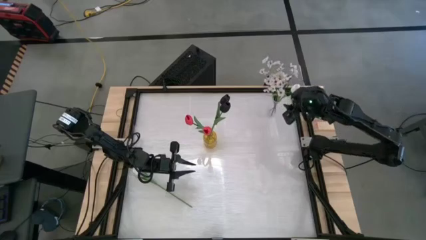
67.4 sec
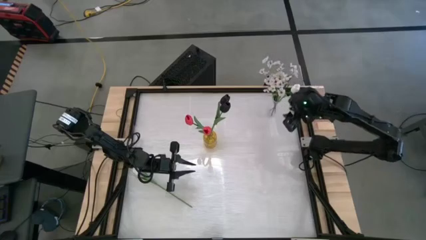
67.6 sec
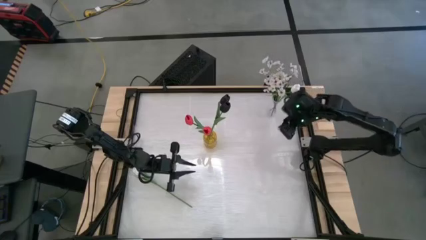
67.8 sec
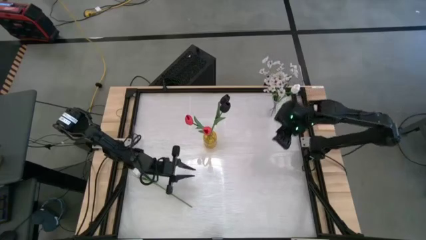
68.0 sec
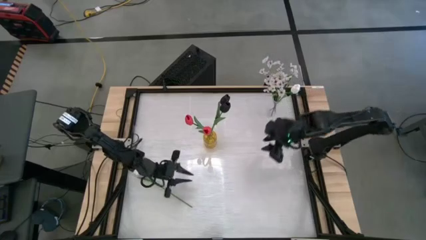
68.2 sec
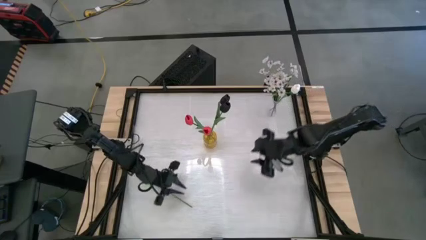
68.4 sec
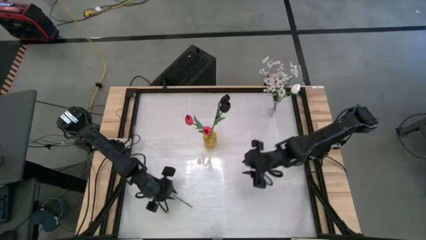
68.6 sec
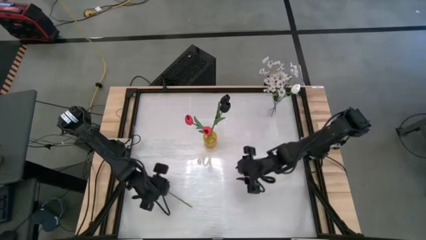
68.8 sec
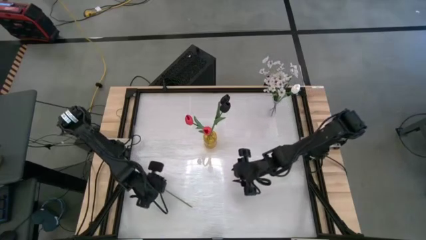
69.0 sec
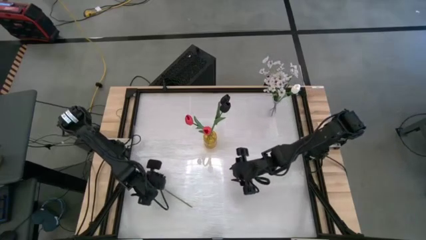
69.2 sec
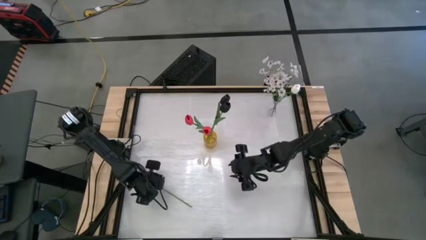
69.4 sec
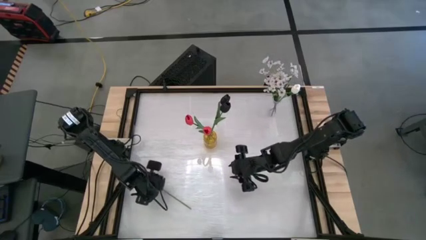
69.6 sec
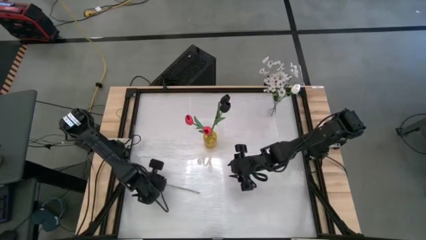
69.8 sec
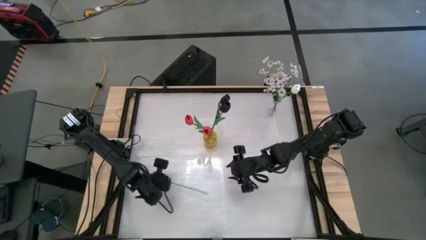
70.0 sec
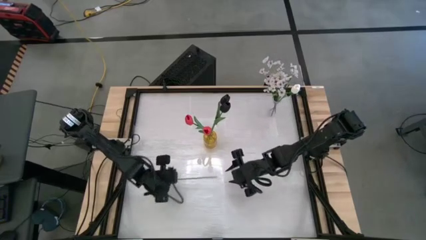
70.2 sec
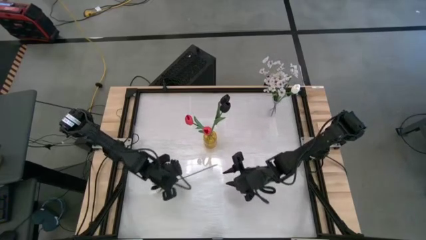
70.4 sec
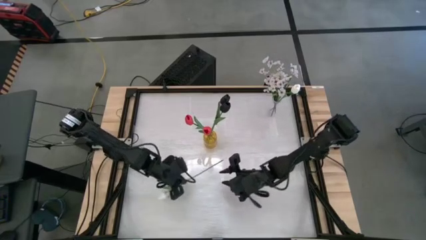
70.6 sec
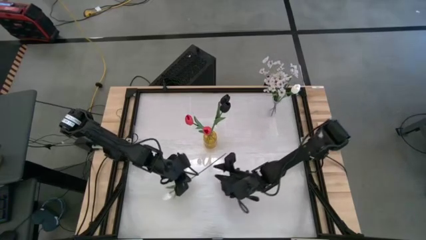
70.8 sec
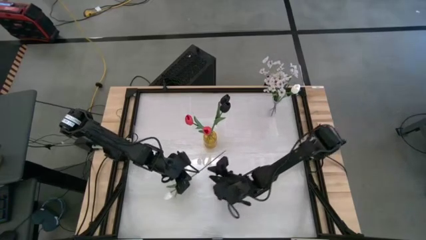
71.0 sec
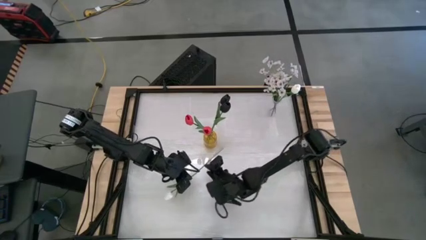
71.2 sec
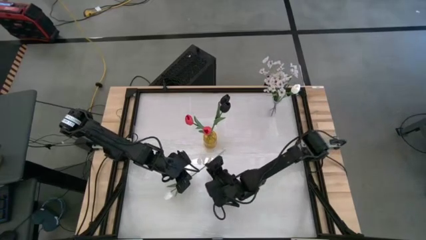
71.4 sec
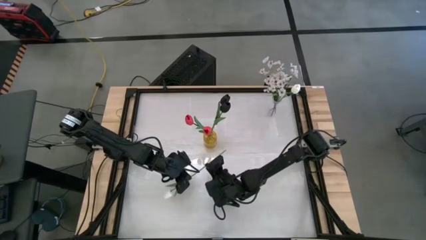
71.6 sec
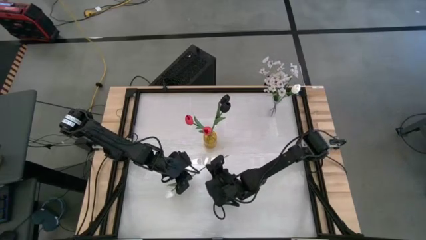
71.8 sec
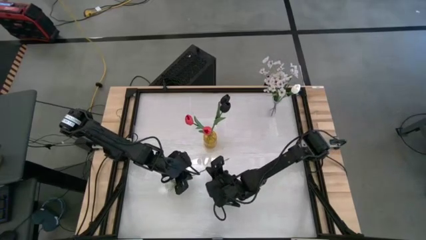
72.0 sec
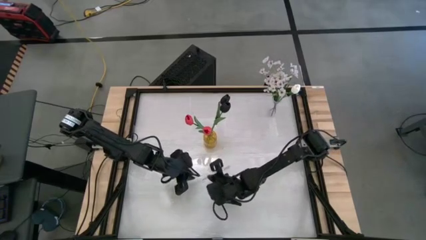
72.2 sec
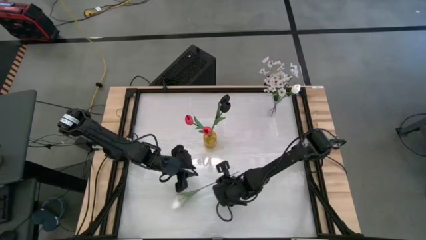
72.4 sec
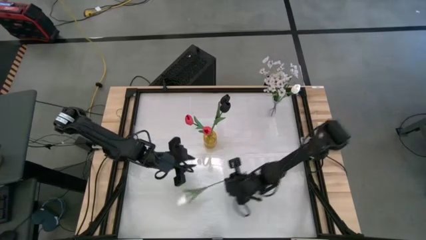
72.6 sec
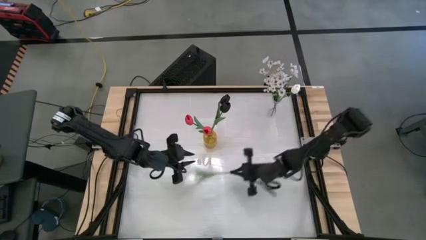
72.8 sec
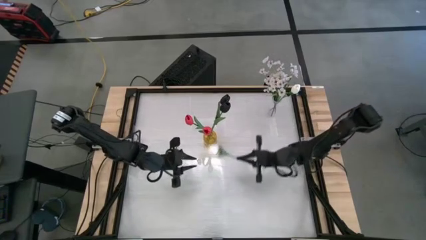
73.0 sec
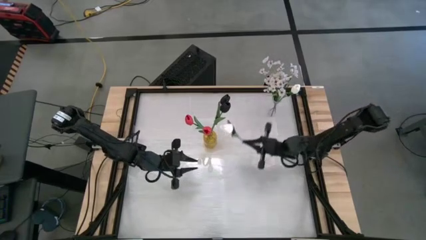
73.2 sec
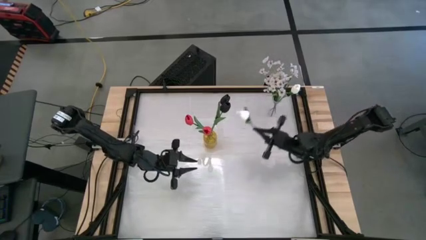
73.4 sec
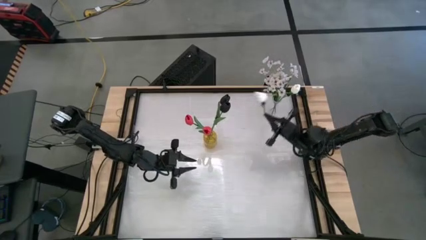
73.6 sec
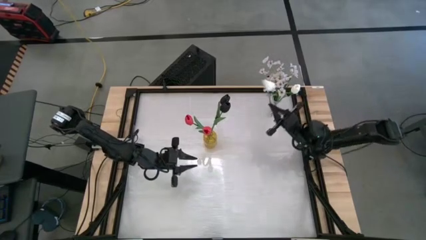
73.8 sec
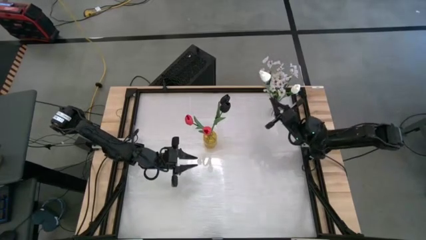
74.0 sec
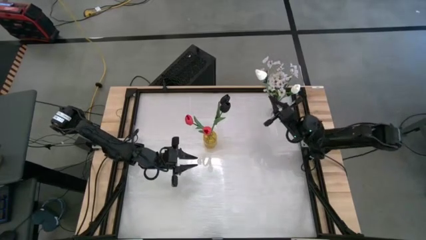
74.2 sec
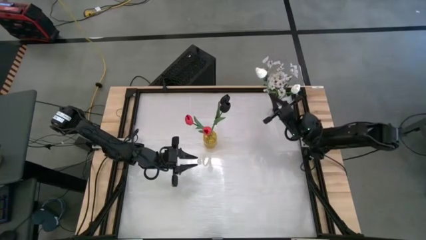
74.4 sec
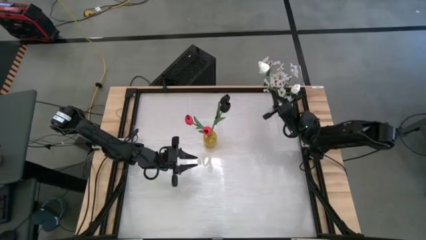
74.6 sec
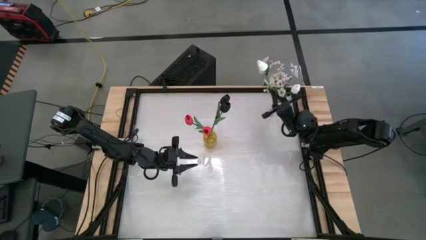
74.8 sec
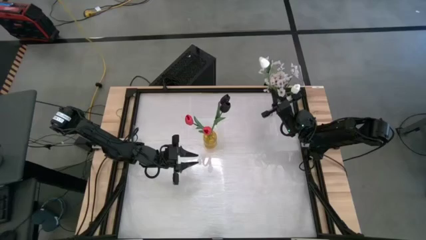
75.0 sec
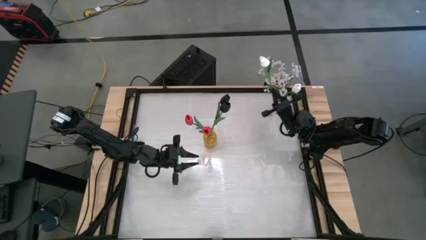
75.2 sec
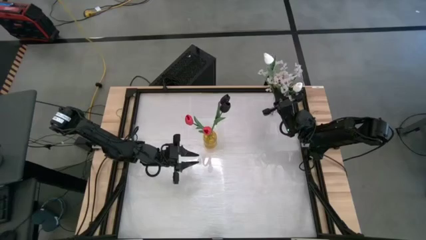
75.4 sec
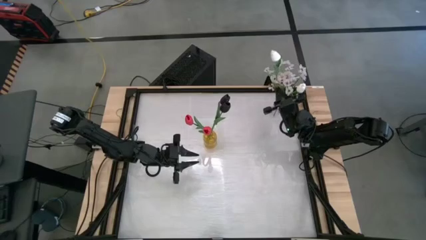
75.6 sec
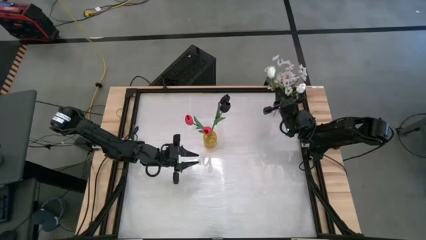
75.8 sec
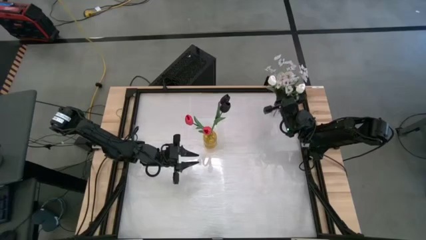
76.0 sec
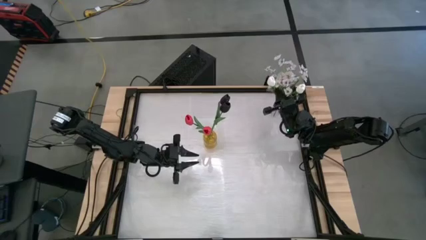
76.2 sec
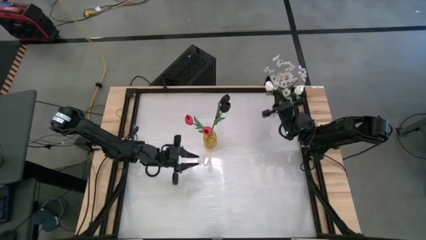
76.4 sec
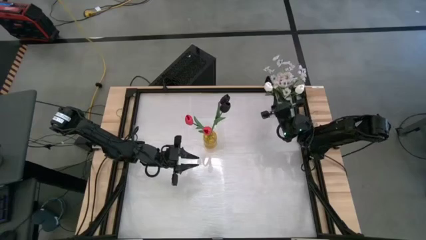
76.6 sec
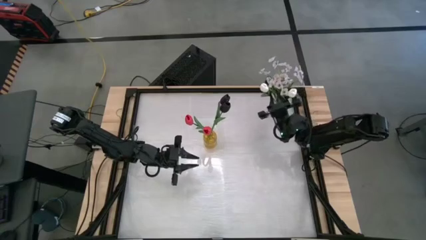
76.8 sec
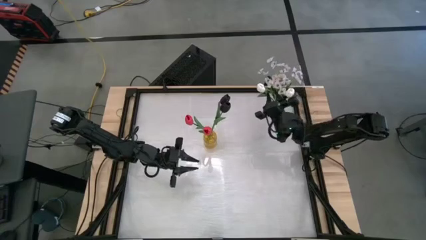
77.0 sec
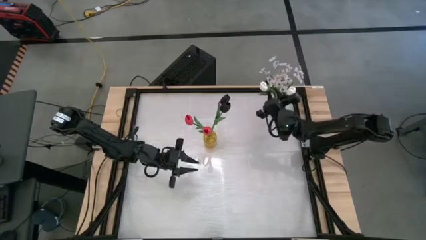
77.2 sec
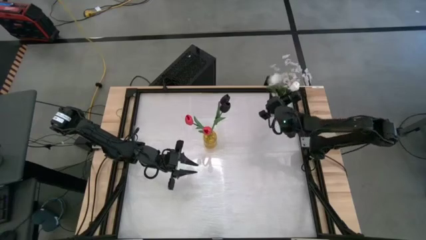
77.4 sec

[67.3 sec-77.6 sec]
Task: Sort flowers into vase by color
Put the white tulip into the transparent flower vase

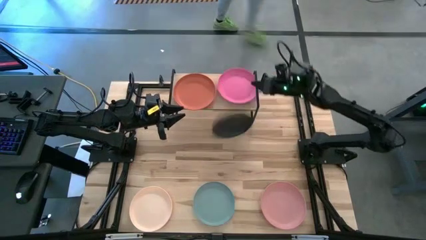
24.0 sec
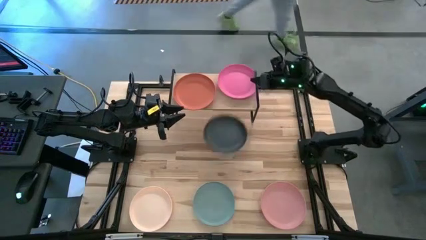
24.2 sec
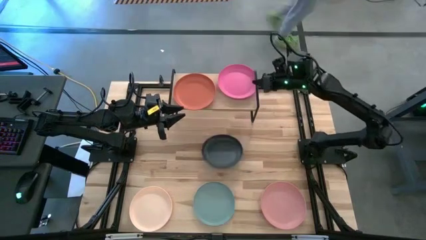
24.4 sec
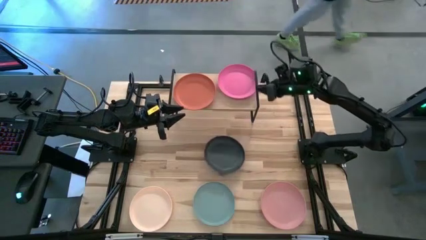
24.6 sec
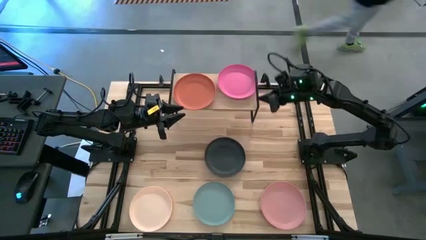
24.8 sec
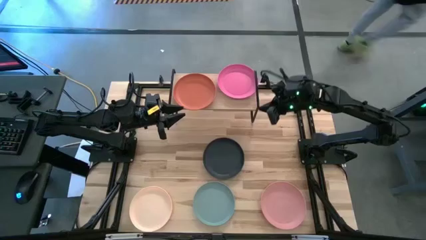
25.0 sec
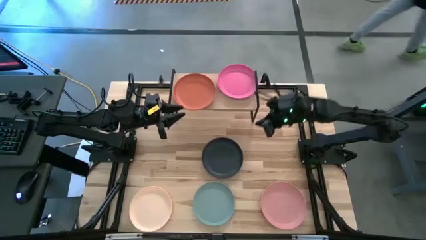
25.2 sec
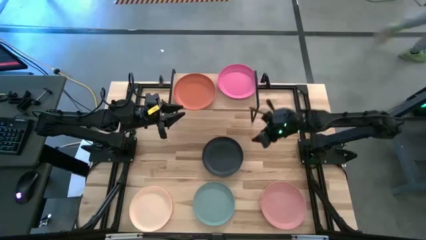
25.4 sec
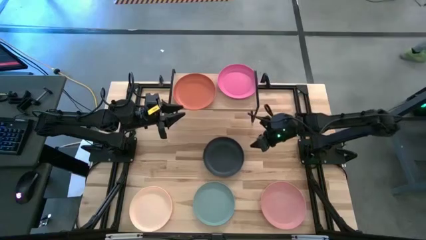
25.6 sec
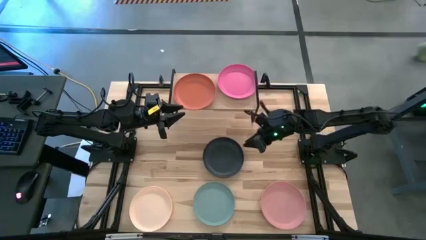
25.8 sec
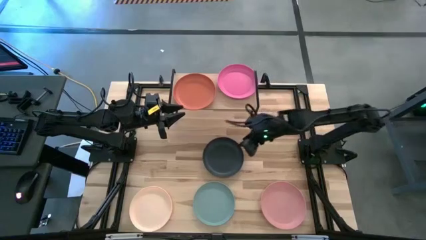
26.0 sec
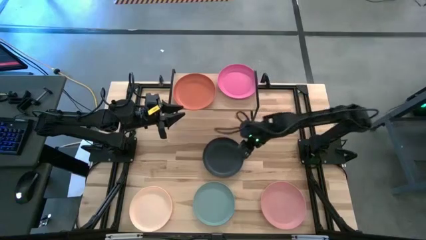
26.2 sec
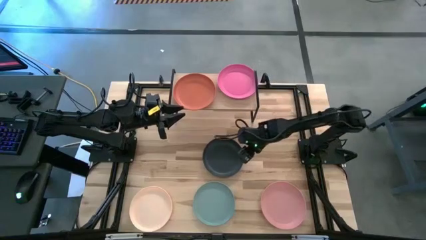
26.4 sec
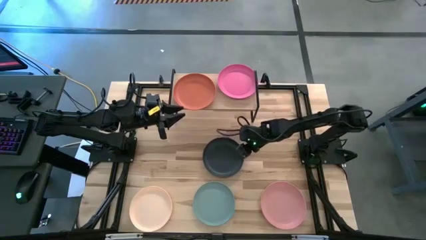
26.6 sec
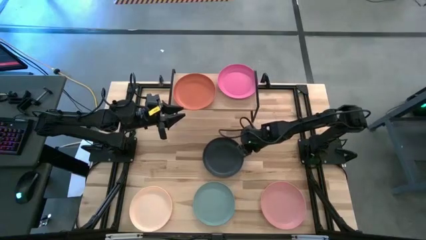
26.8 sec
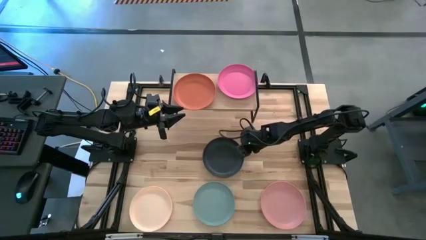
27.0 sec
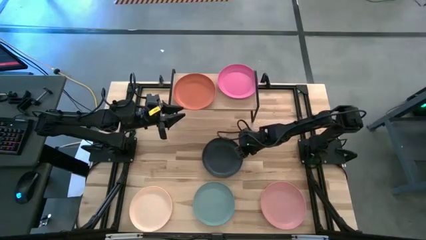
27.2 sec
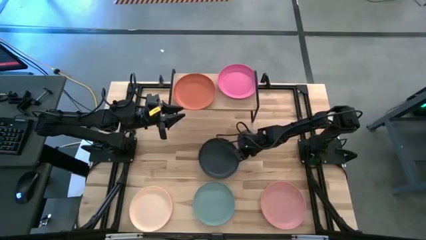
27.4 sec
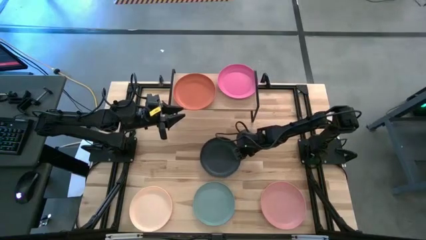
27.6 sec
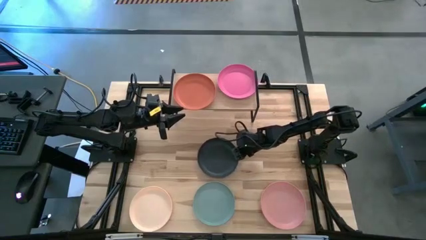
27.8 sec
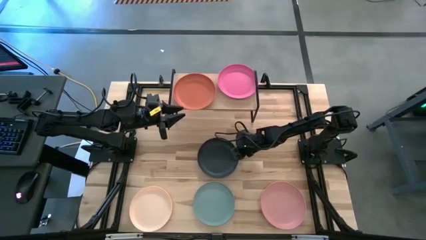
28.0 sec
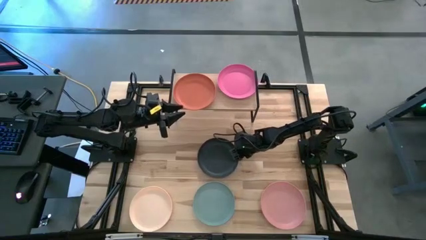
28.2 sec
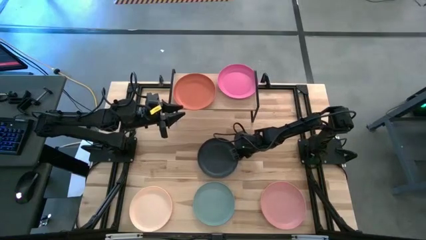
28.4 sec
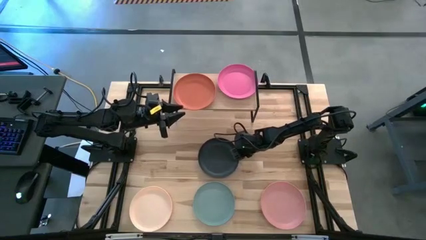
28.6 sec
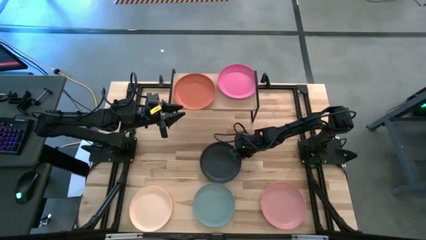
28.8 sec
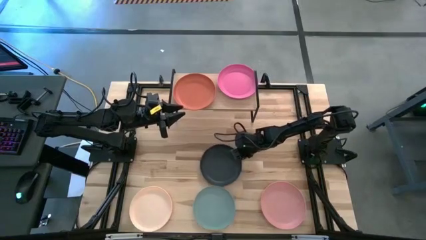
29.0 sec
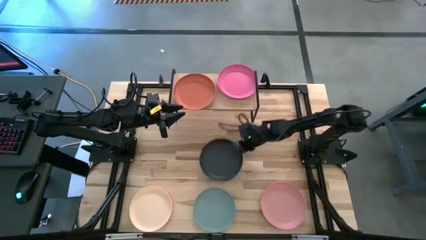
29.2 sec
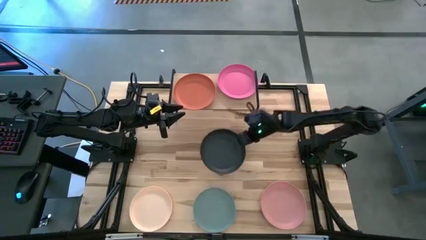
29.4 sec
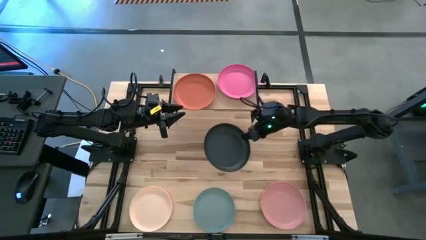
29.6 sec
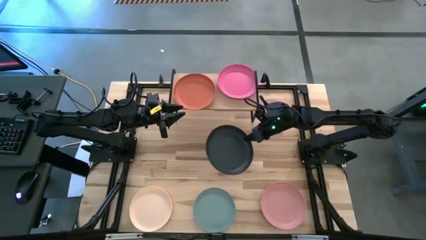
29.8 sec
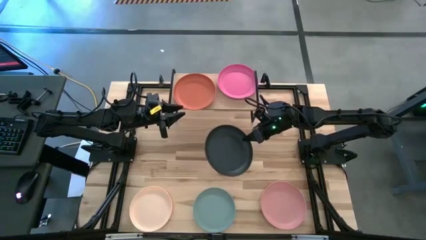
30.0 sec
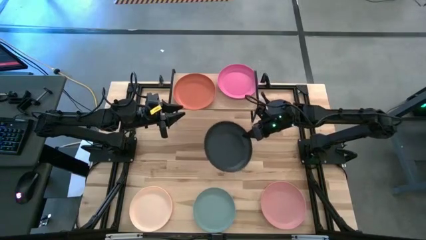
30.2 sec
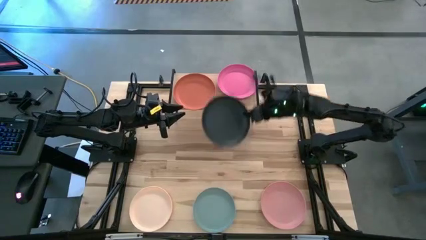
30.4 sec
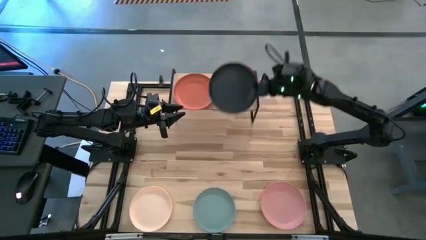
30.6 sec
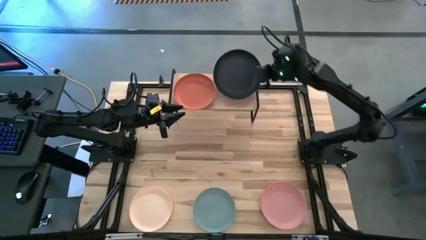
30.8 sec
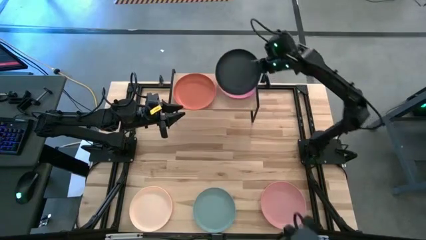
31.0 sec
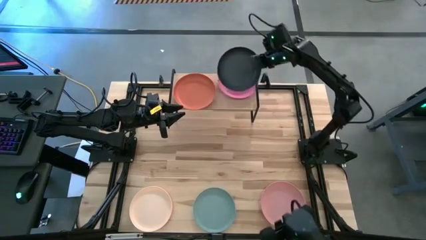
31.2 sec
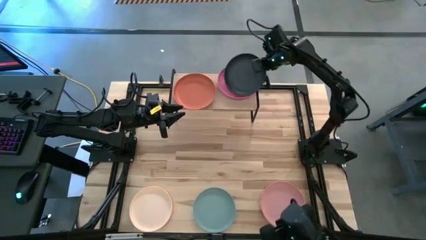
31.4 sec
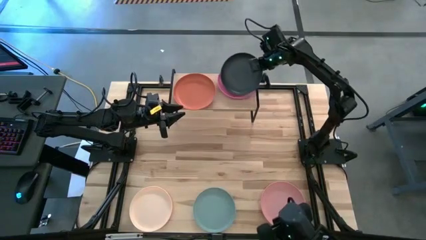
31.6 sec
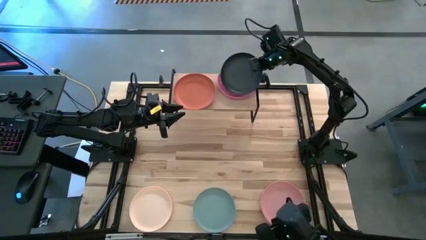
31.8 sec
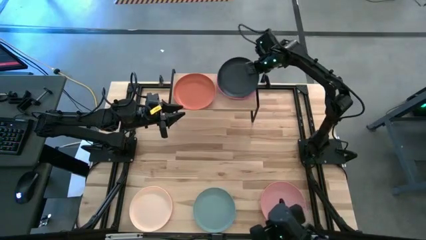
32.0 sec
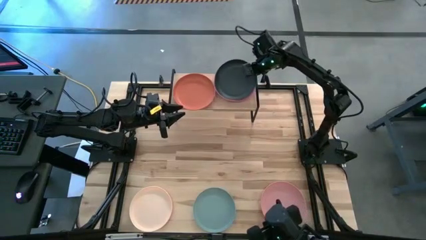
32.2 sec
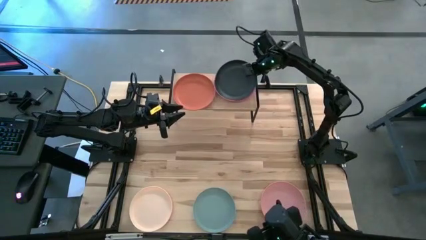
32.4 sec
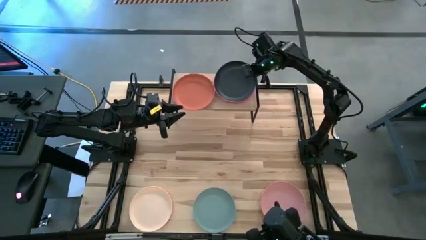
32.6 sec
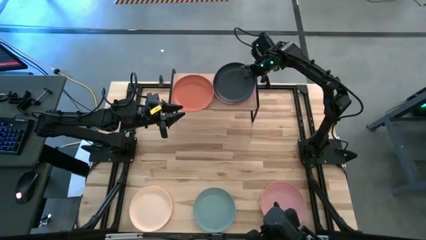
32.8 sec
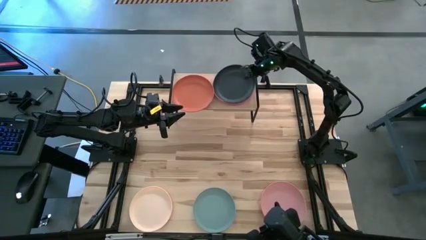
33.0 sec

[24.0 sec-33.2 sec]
Task: Place and stack plates onto a shelf
Stack the black plate on top of the pink plate on the shelf
